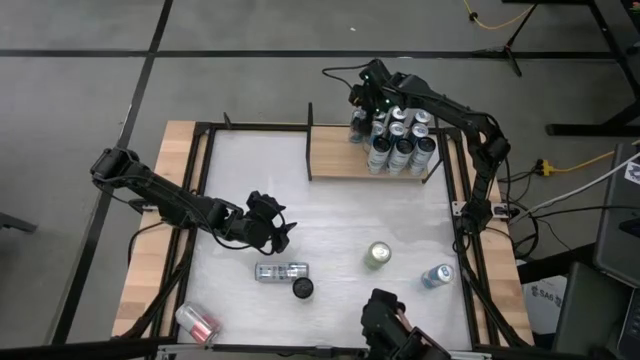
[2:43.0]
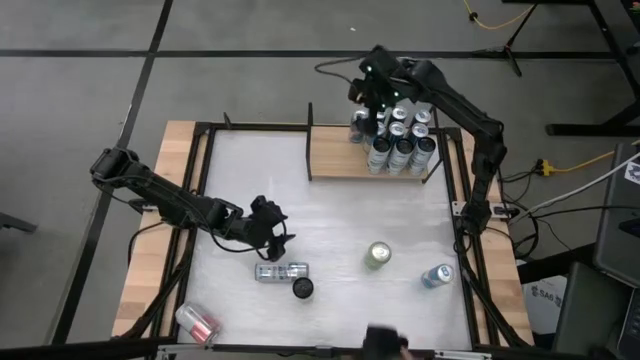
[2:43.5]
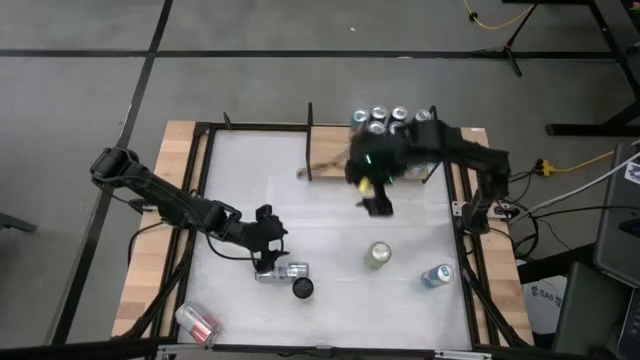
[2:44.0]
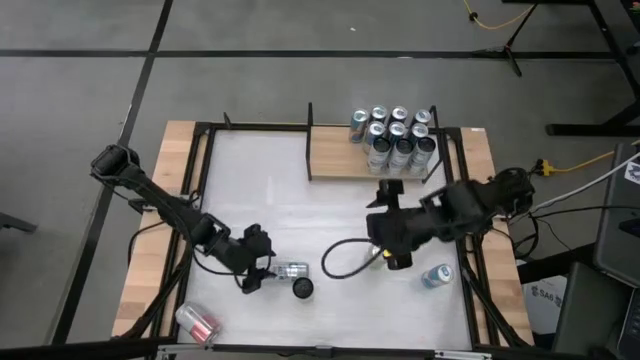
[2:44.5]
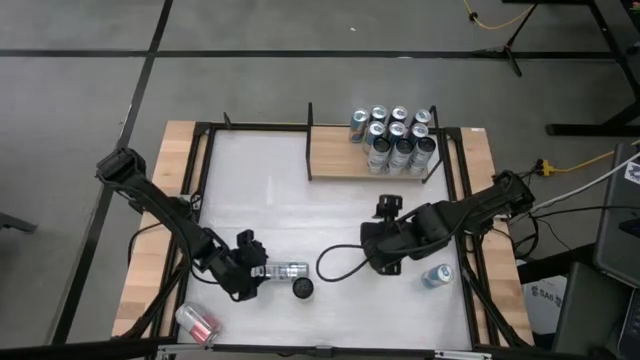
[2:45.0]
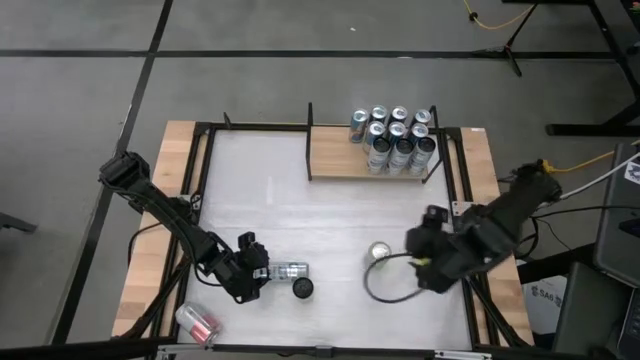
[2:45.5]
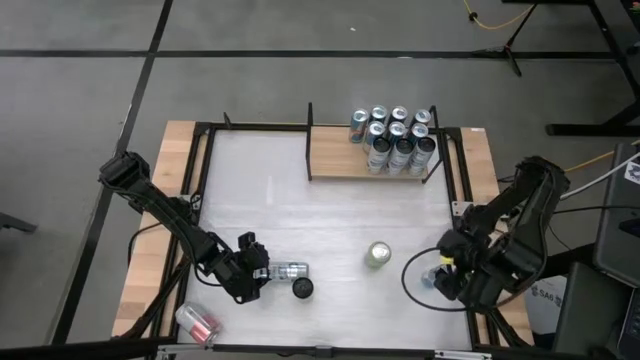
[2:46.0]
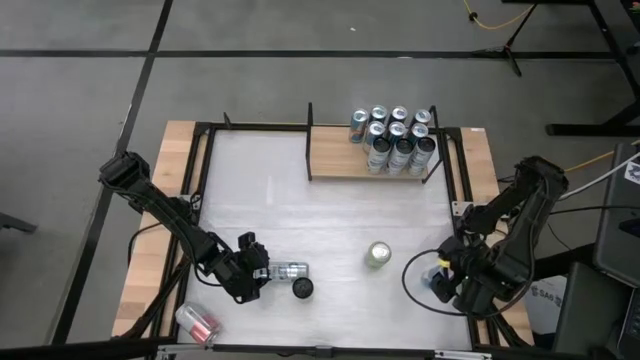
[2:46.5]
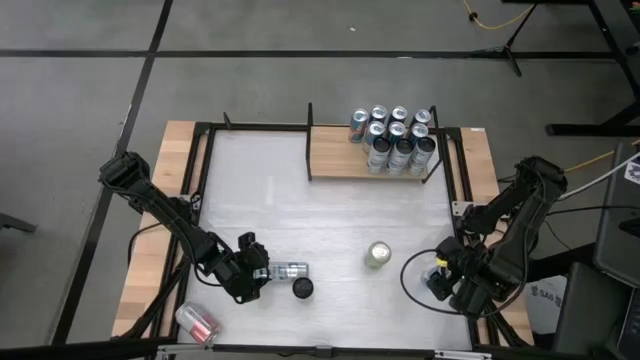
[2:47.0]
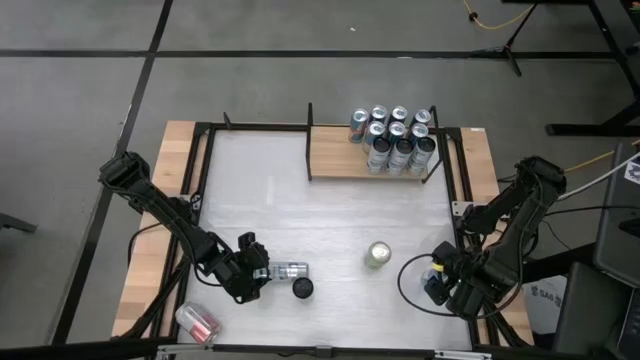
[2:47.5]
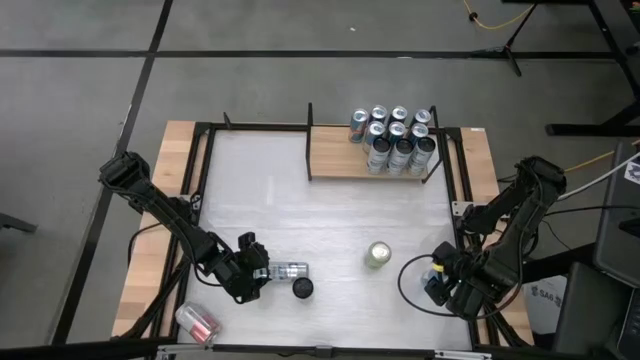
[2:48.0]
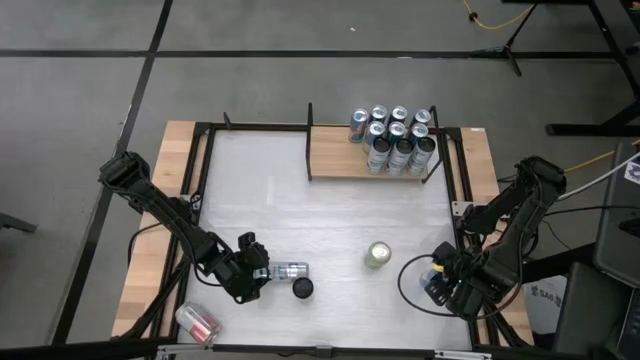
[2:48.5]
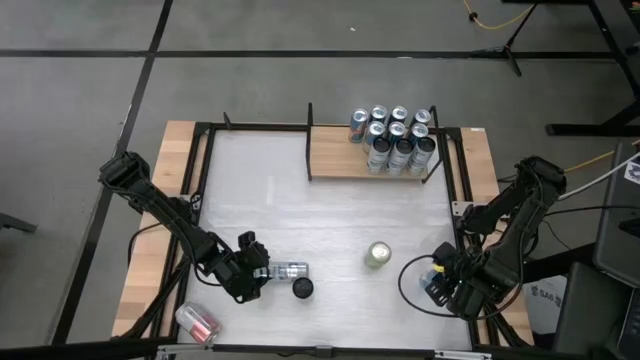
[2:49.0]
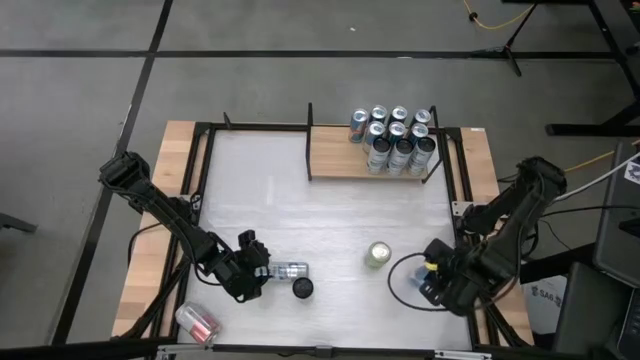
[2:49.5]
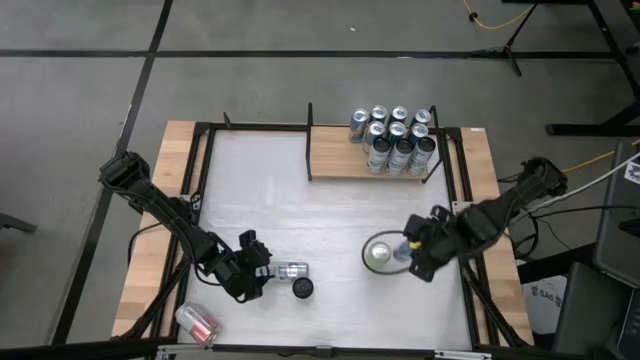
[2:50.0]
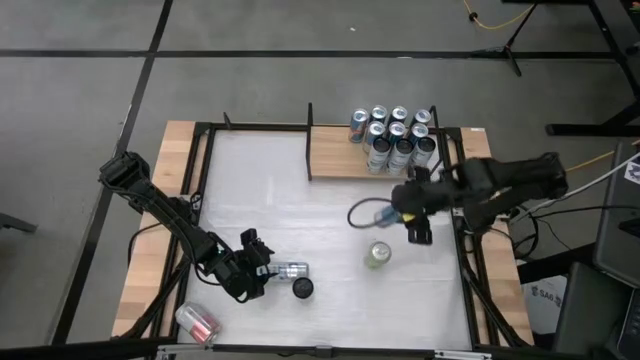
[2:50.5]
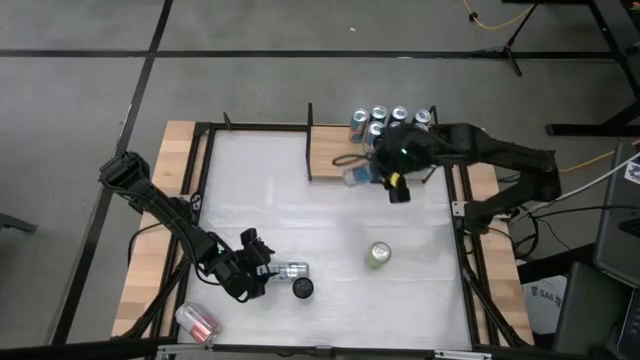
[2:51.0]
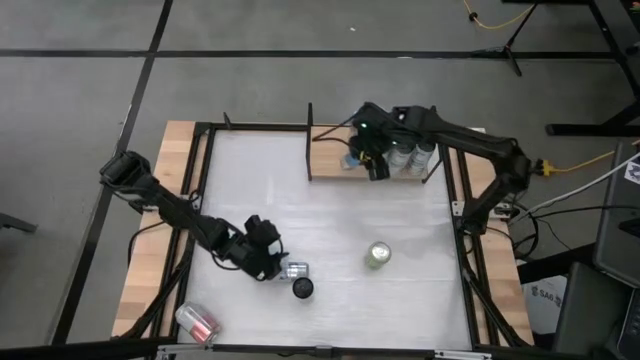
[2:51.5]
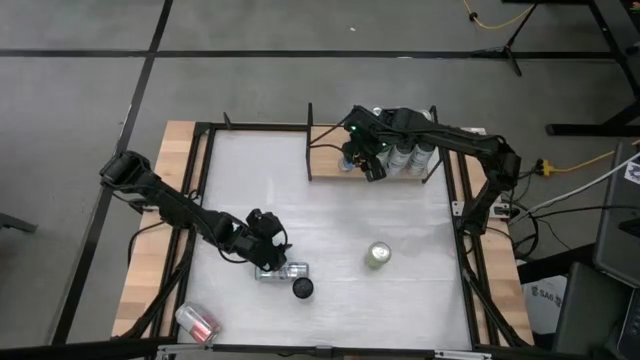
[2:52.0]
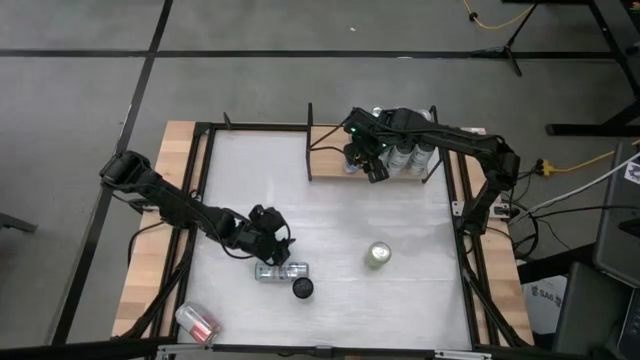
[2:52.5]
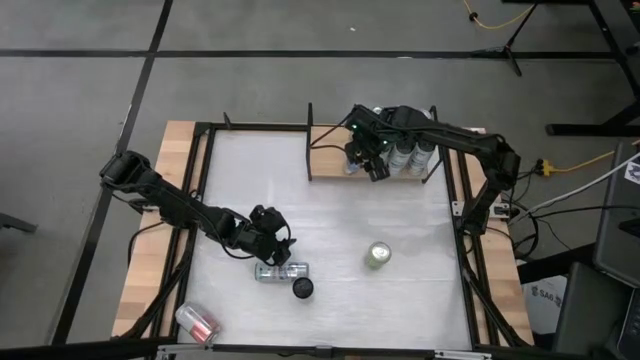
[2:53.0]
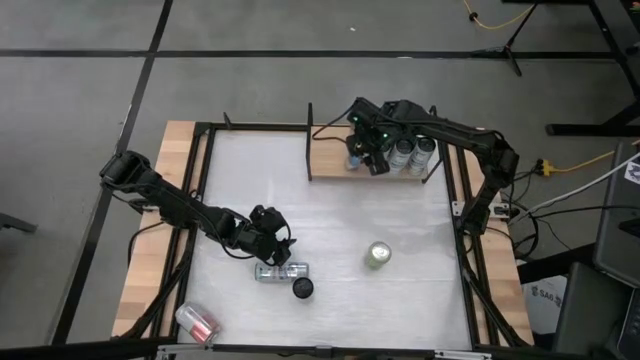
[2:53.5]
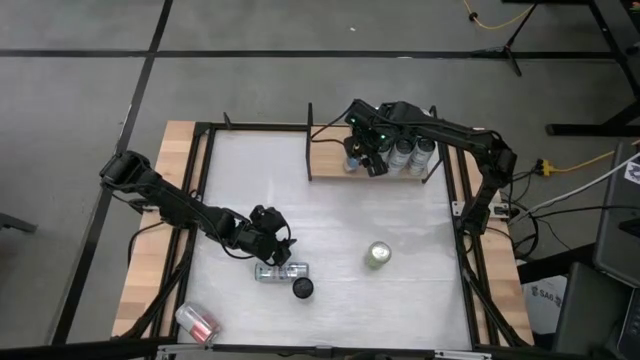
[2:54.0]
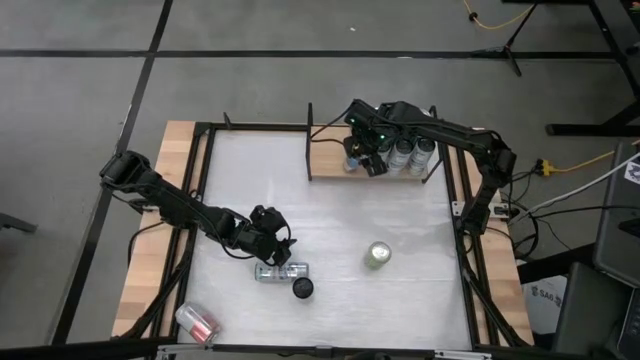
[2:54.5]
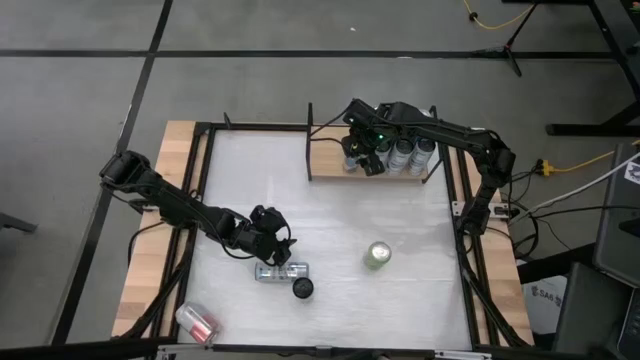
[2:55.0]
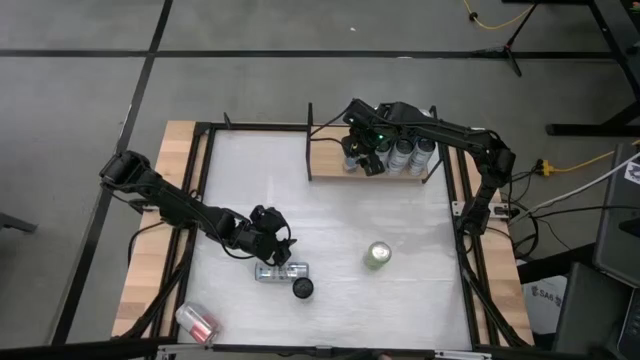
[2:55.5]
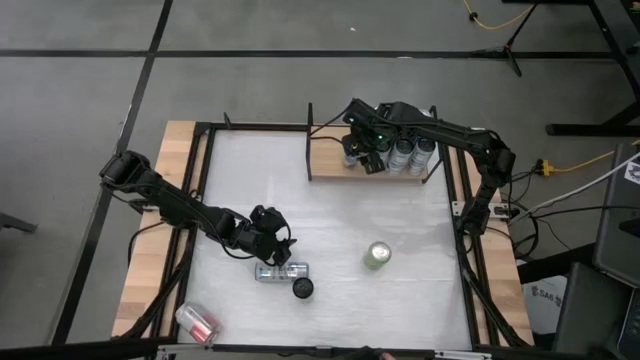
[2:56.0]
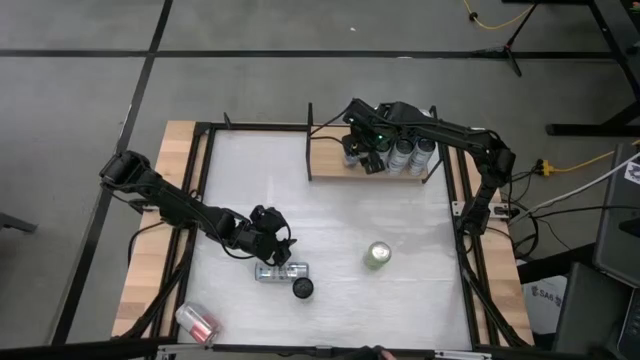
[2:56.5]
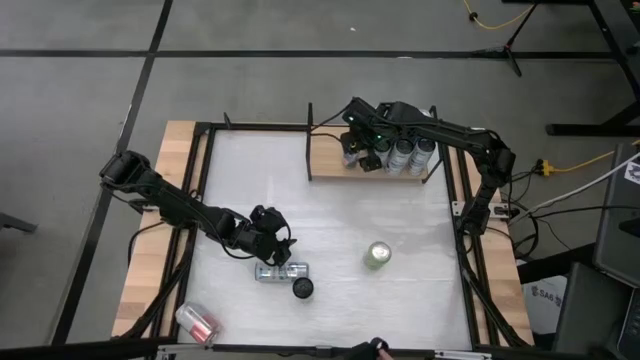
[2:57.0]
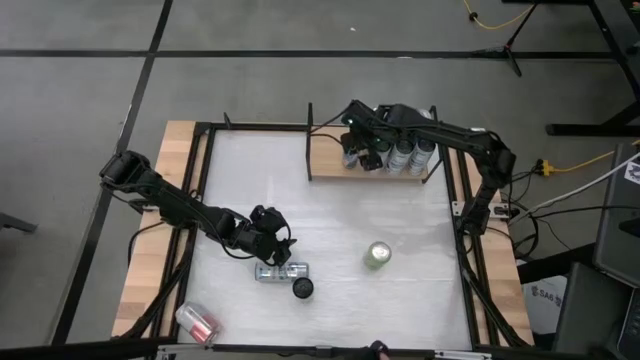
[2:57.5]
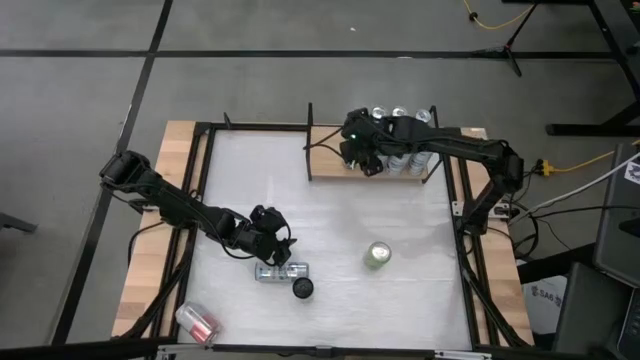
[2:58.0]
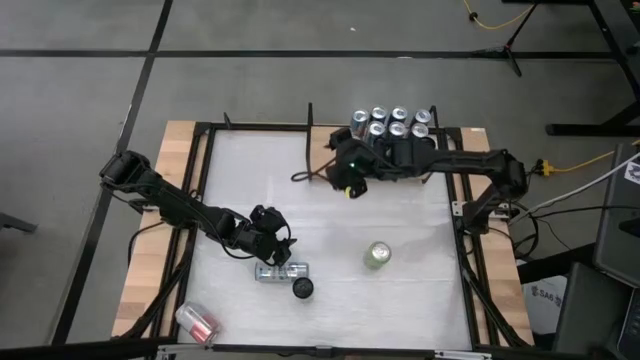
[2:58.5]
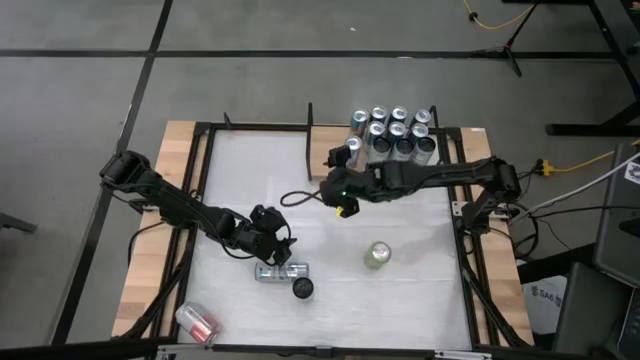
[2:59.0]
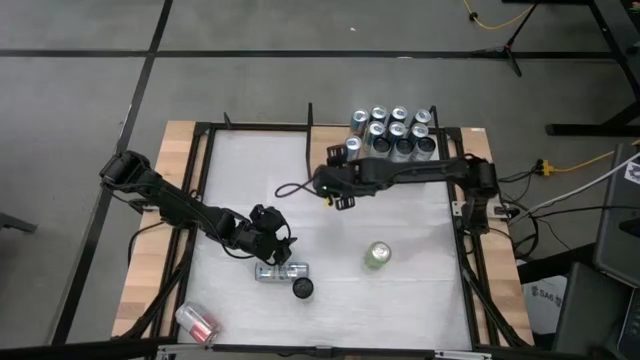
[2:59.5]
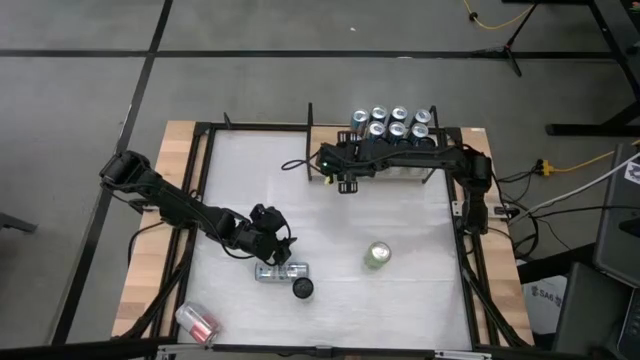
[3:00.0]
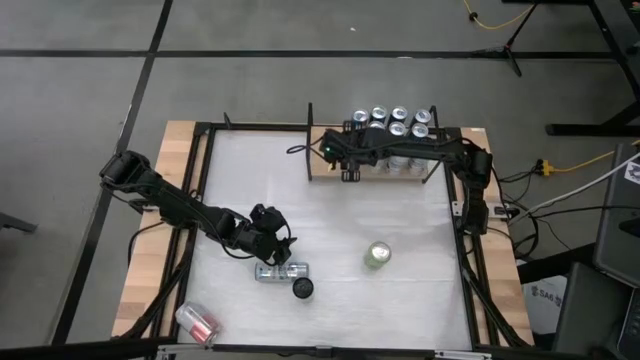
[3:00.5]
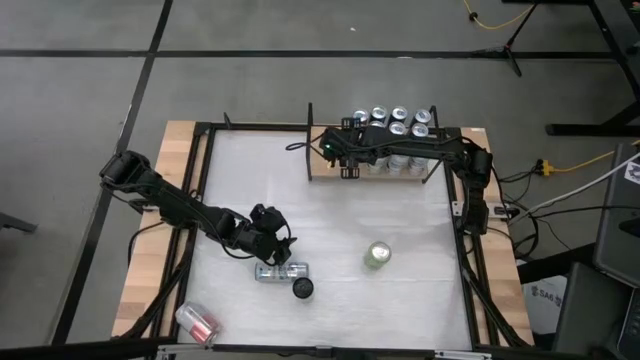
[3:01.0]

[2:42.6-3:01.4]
Task: Place canned beverage on shelf
Put the blue soda can on the shelf aligned with the other blue soda cans

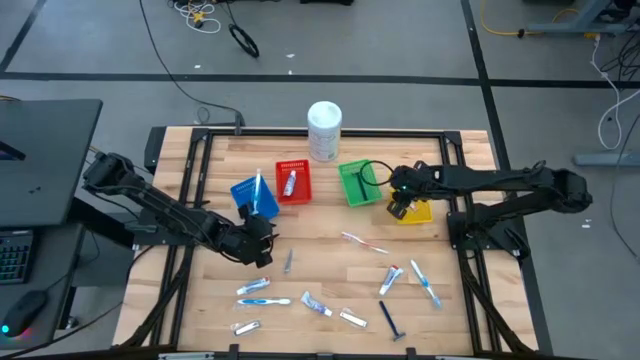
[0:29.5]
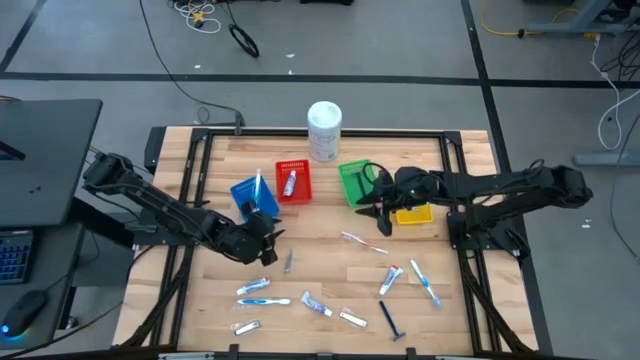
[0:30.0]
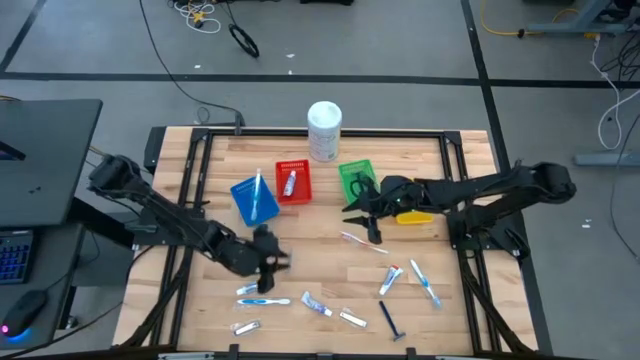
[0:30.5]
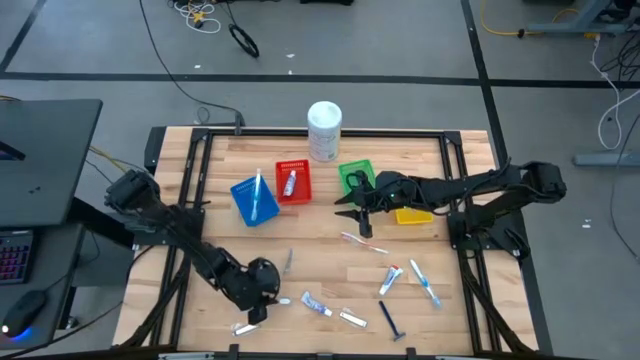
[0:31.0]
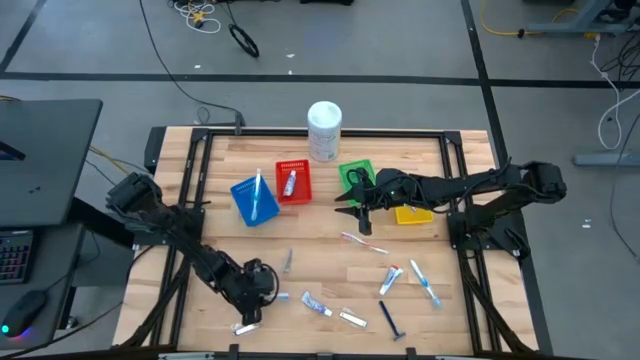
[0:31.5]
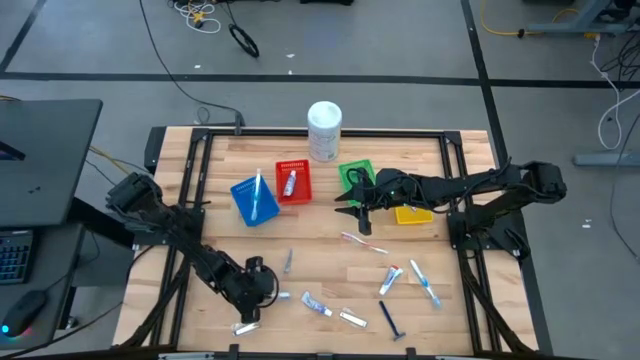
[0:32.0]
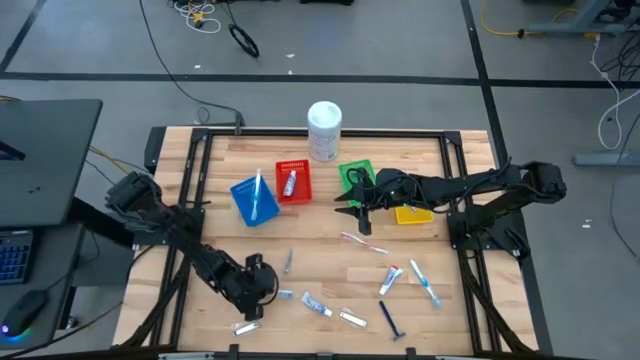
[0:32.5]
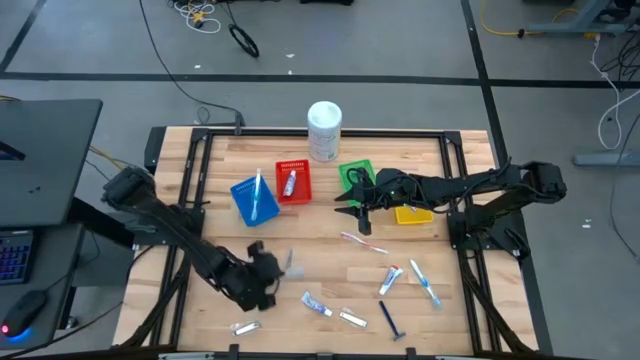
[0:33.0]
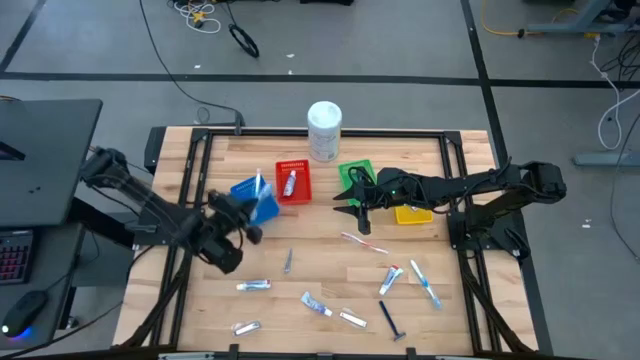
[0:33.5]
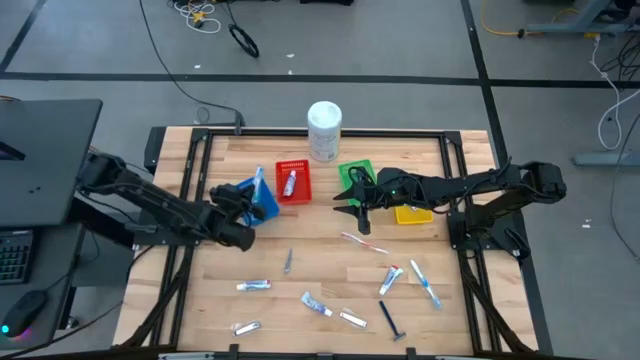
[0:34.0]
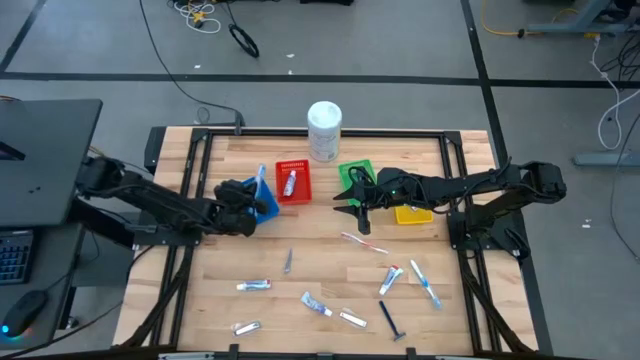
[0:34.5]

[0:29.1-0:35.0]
Task: Pick & Place Travel size toiletries
Put the blue toothbrush into the blue bin
